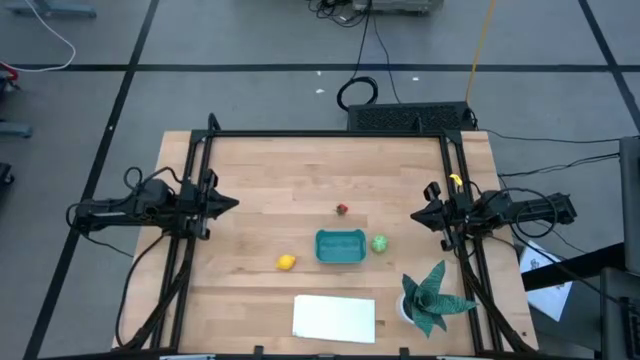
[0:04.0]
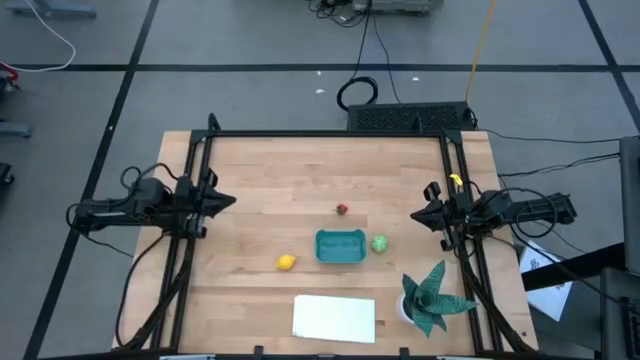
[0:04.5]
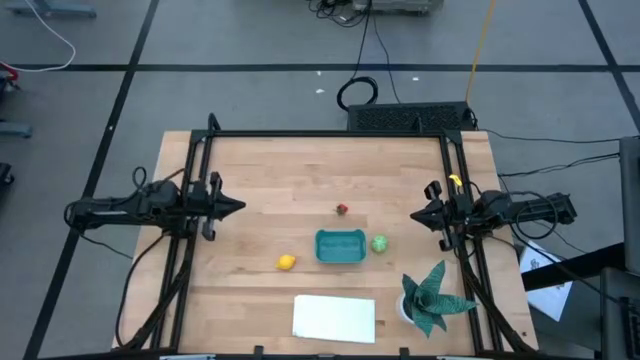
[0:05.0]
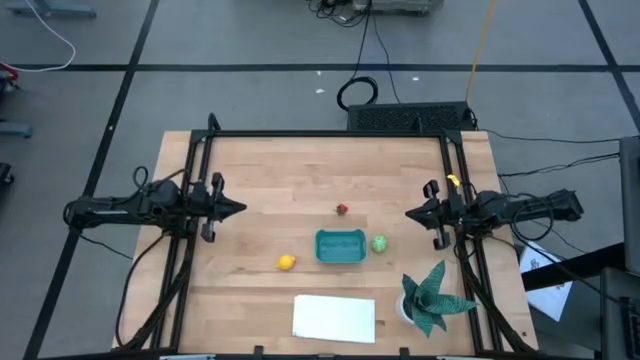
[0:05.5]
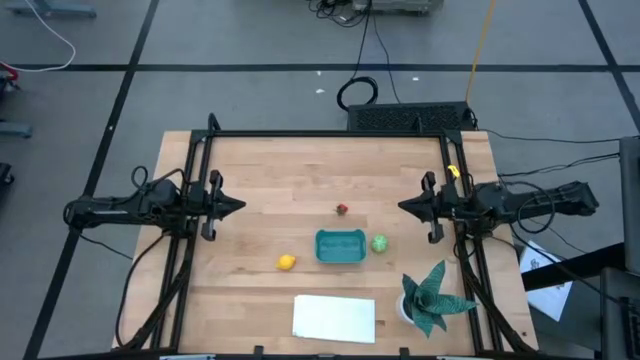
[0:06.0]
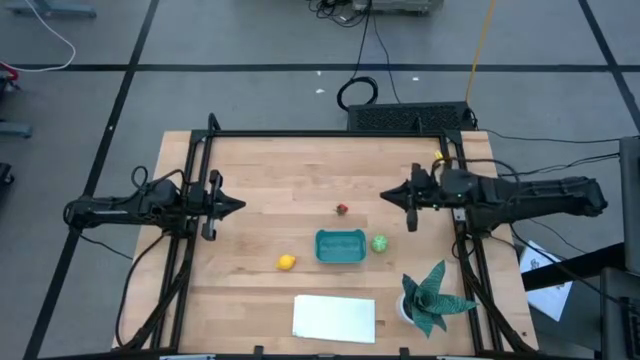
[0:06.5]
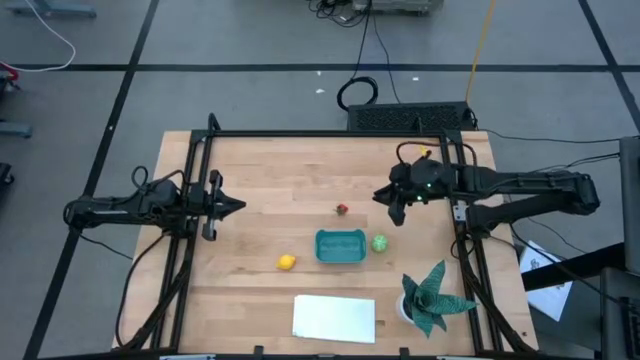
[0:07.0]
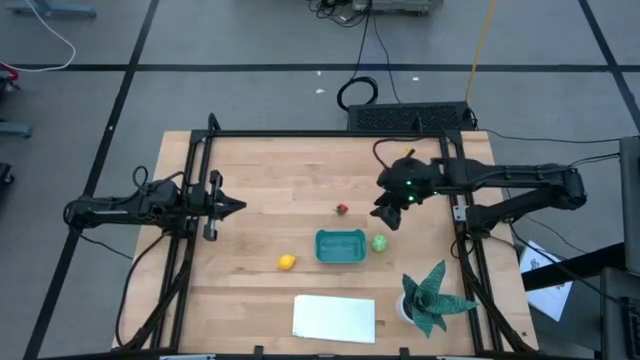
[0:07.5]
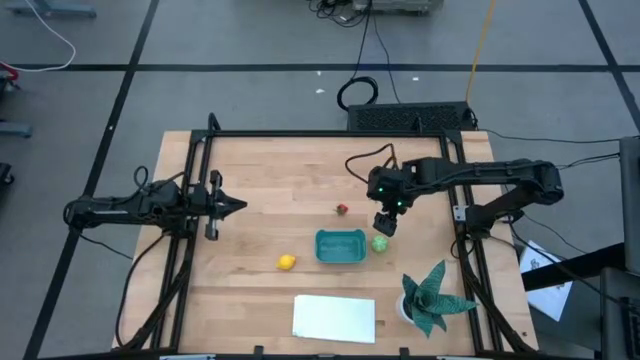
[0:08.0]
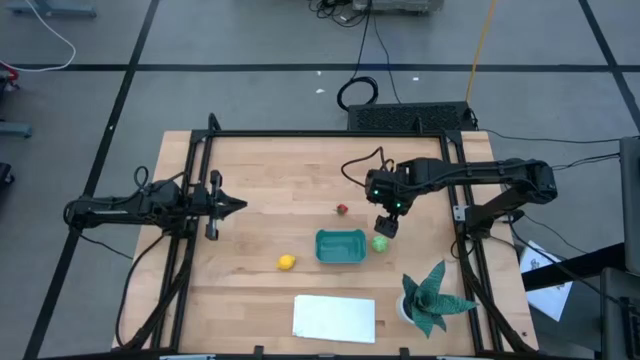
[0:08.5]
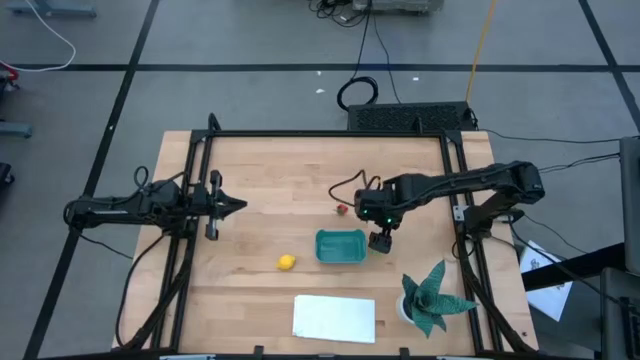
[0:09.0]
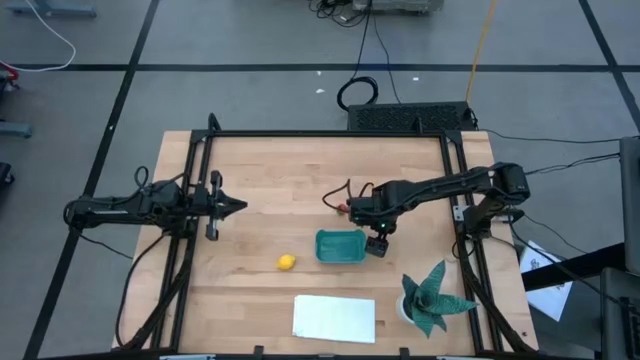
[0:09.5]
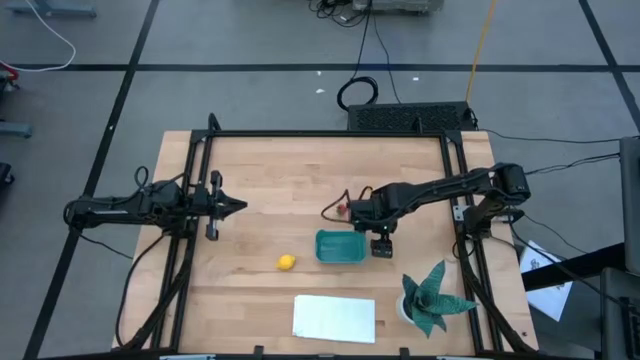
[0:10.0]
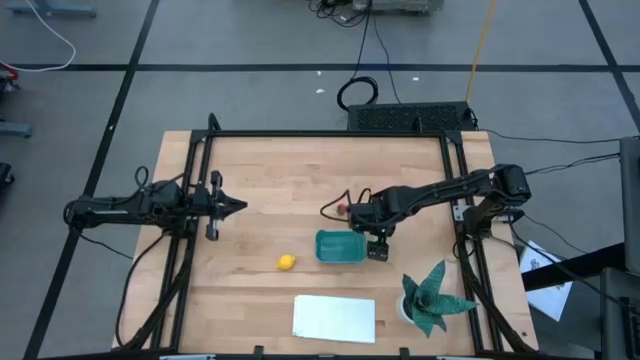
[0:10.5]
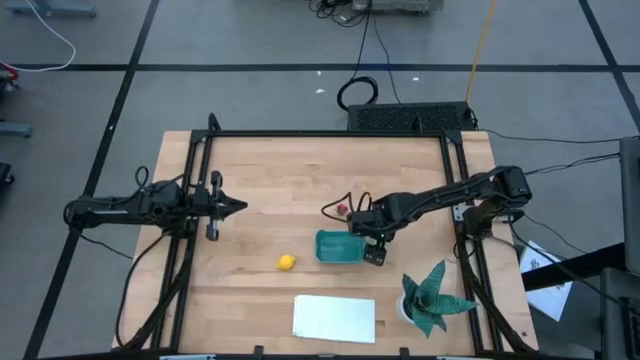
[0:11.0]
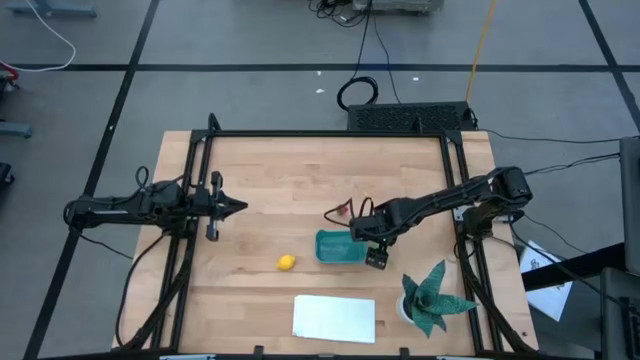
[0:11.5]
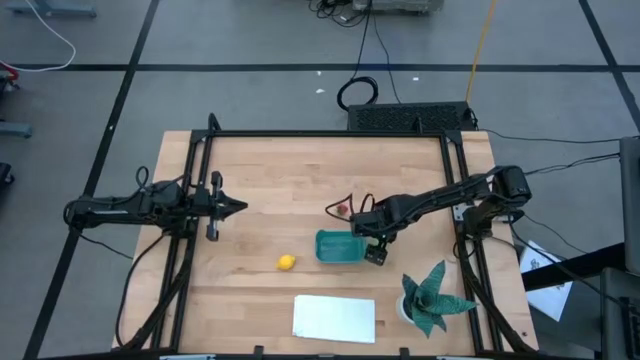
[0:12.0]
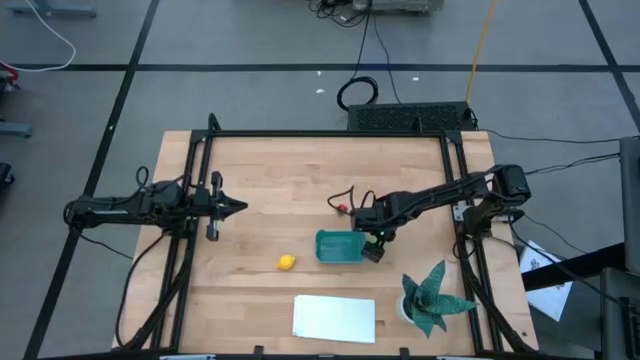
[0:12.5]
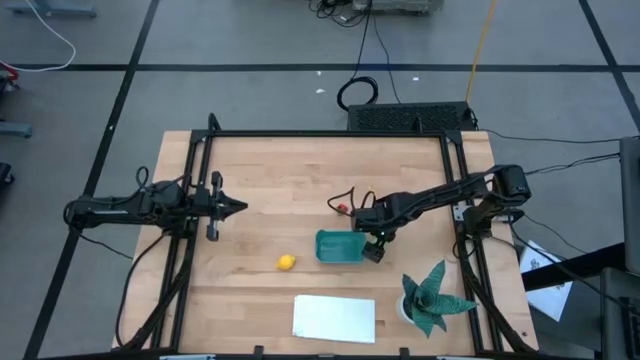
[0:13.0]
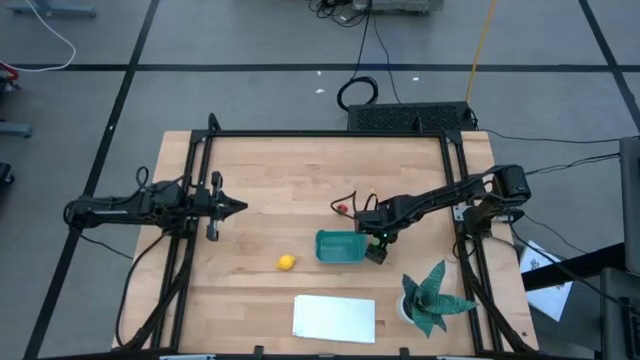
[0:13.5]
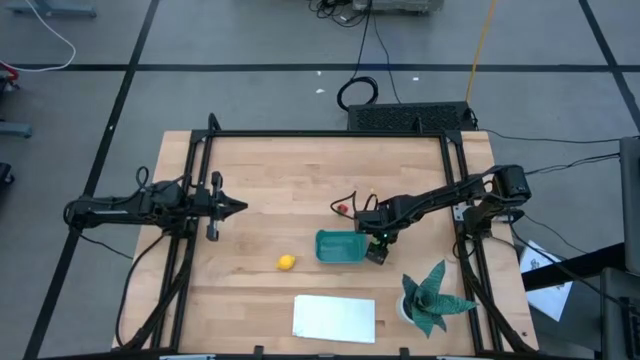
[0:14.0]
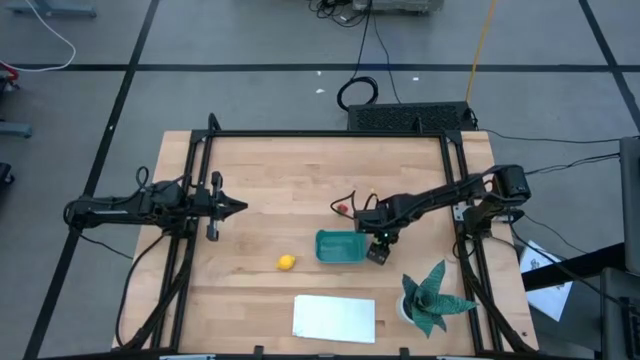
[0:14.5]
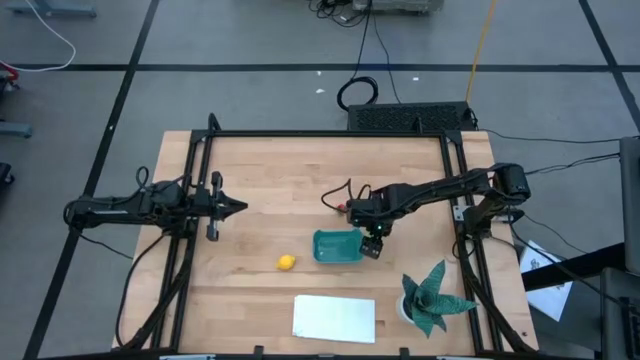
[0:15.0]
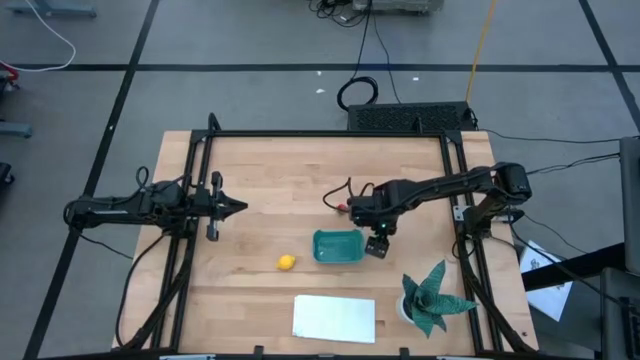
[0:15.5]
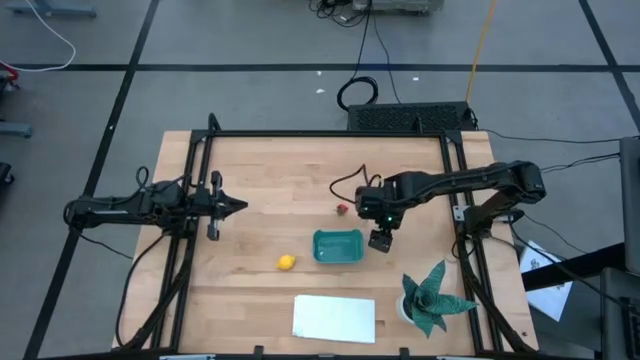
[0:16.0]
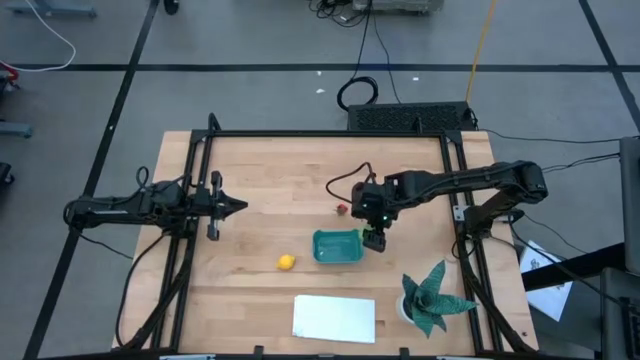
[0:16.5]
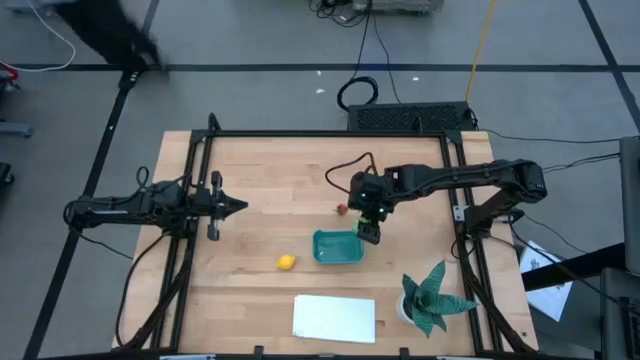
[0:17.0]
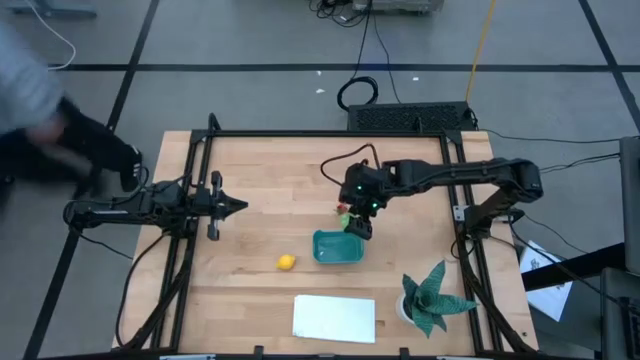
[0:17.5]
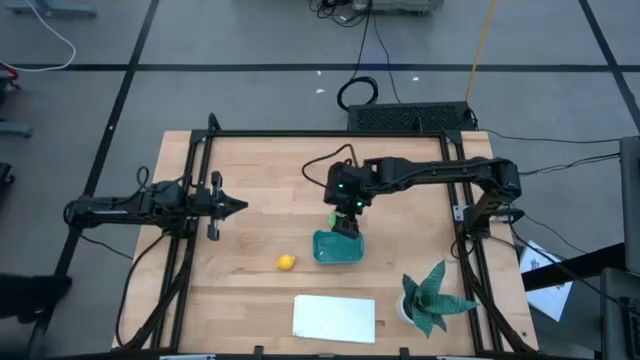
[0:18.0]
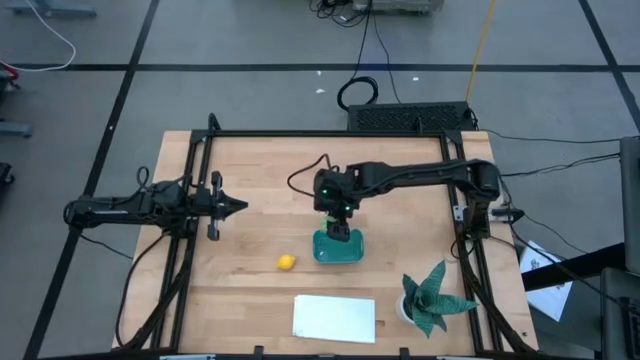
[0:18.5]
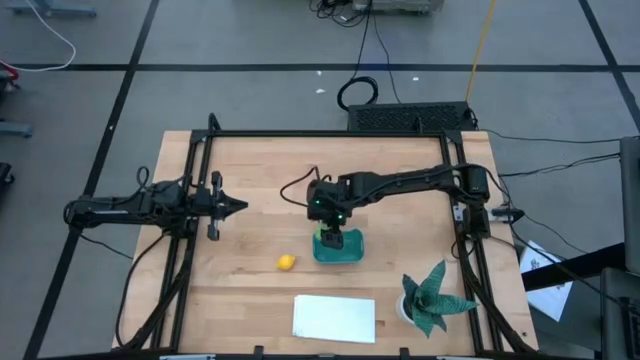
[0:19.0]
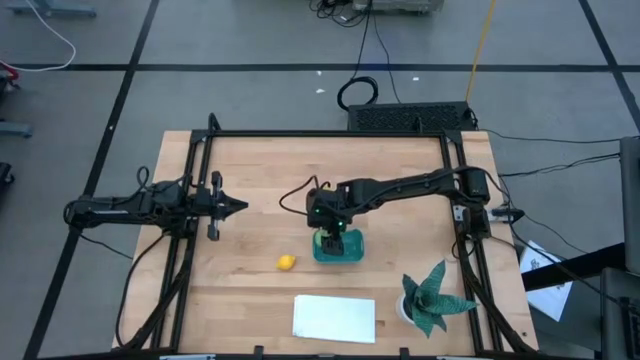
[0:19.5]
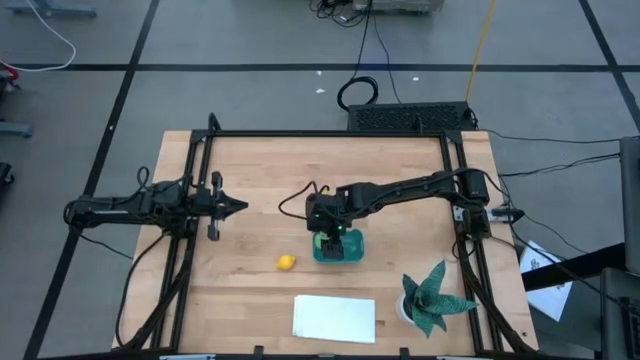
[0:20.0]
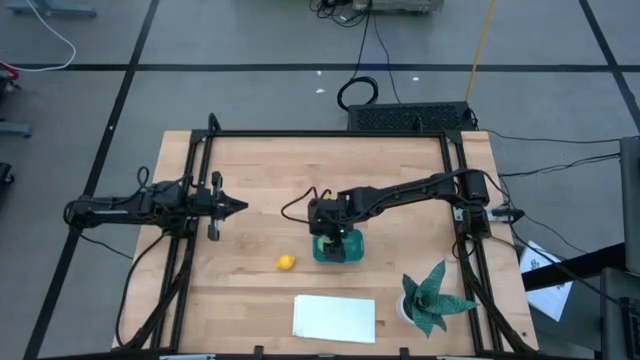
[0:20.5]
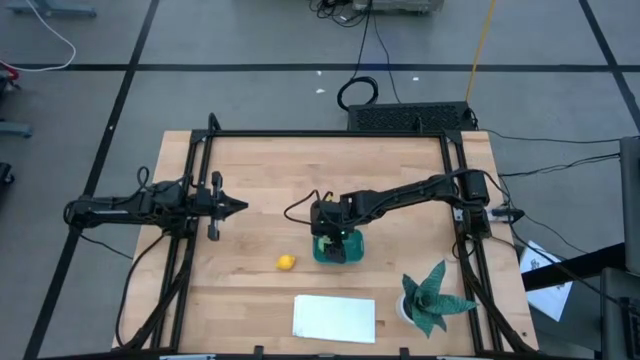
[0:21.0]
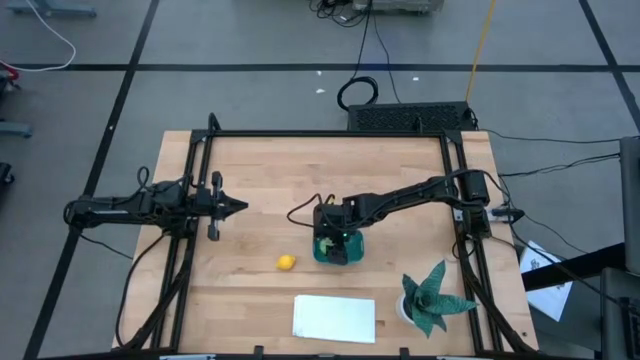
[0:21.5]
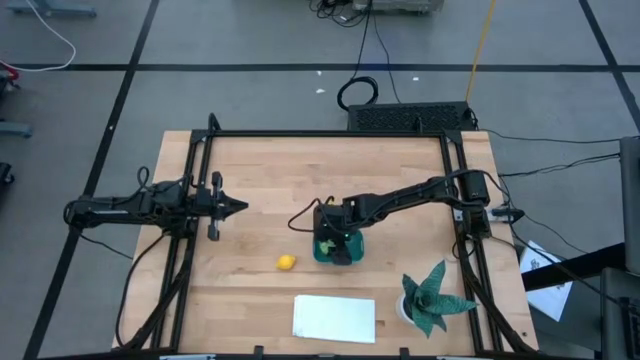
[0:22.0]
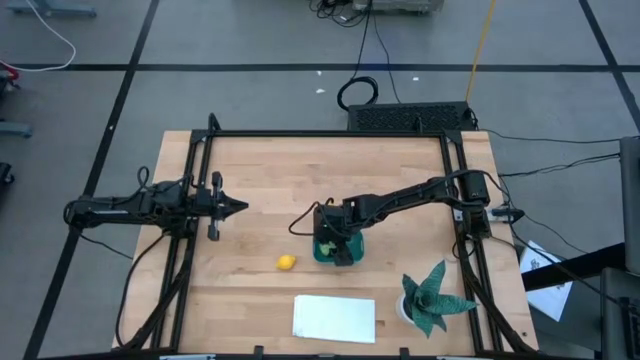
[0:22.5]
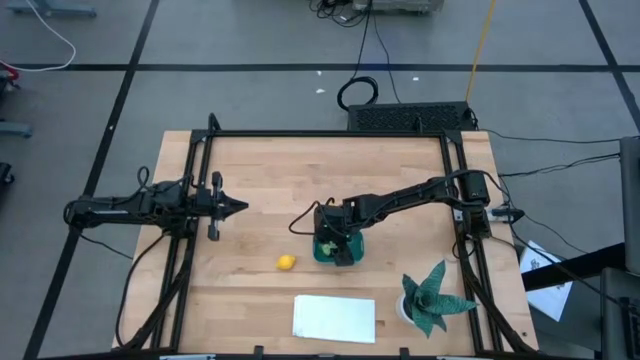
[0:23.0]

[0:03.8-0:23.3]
Task: Pick and placing Produce into tupperware
Put the cabbage into the bin
